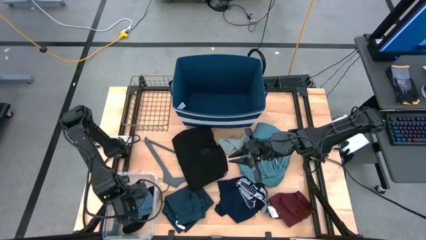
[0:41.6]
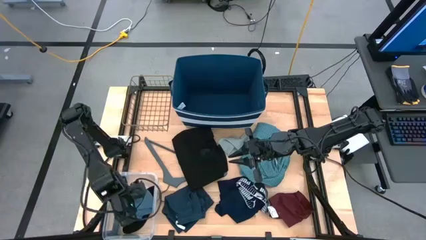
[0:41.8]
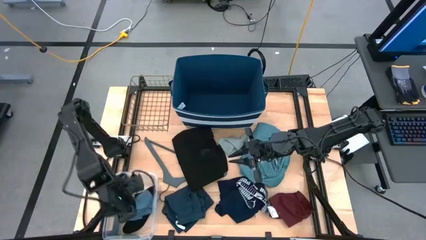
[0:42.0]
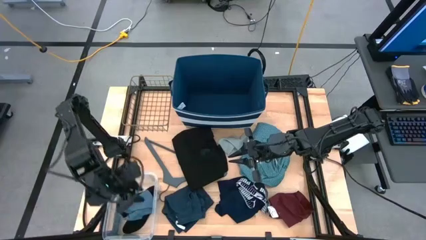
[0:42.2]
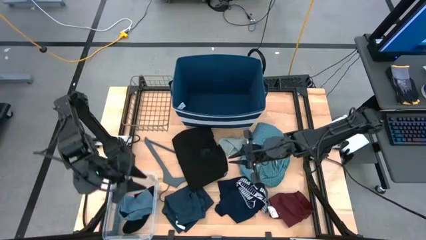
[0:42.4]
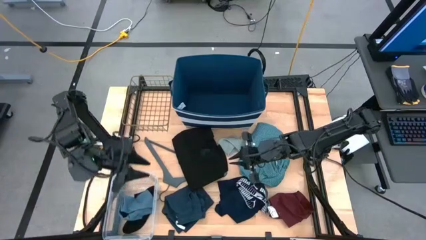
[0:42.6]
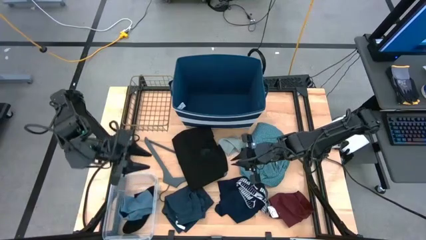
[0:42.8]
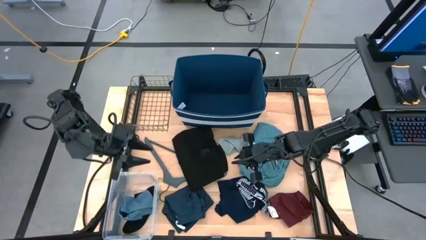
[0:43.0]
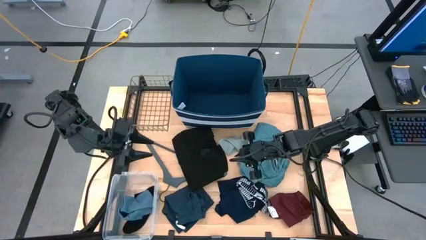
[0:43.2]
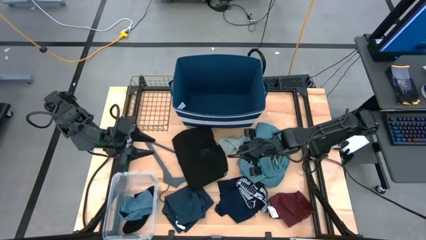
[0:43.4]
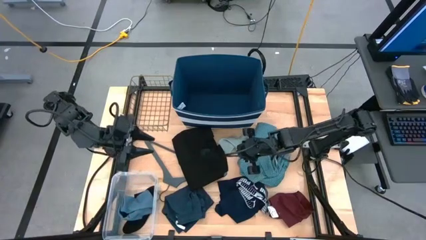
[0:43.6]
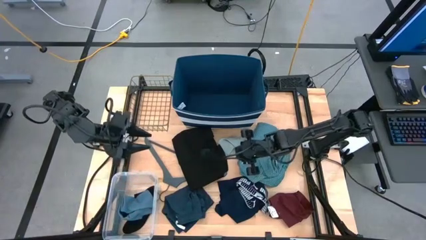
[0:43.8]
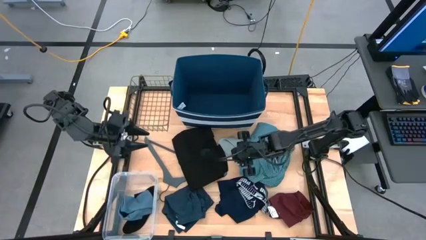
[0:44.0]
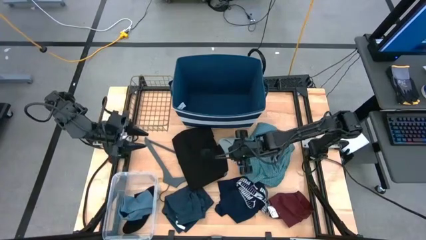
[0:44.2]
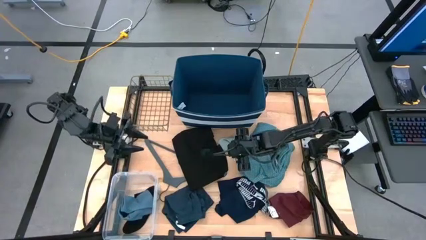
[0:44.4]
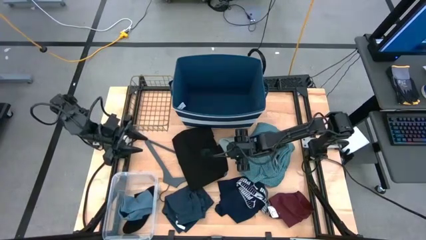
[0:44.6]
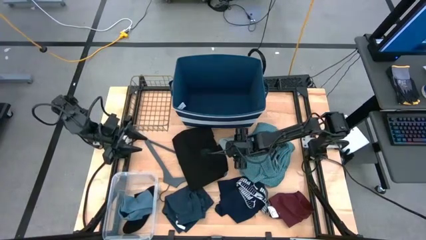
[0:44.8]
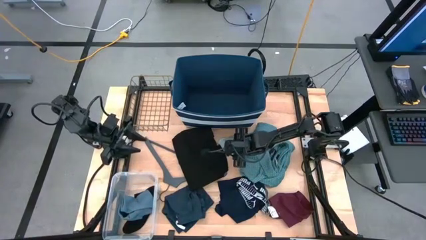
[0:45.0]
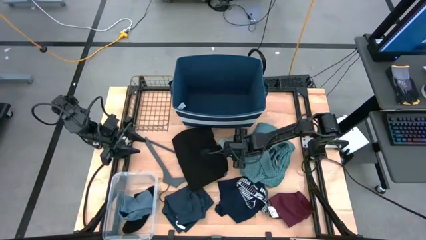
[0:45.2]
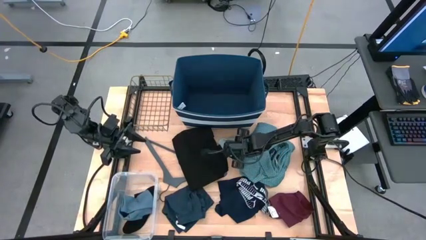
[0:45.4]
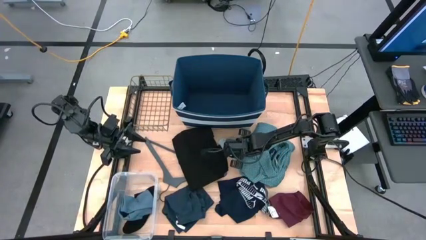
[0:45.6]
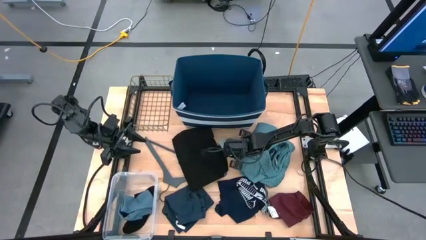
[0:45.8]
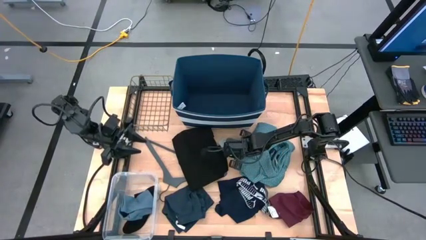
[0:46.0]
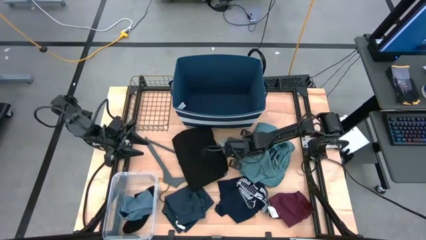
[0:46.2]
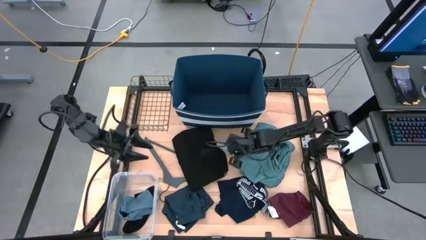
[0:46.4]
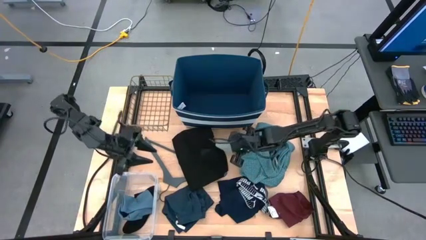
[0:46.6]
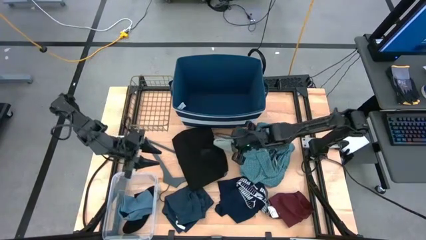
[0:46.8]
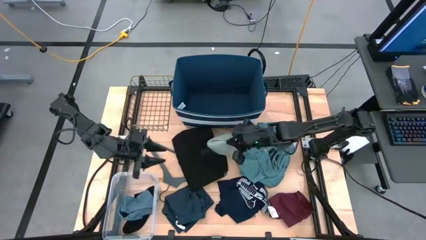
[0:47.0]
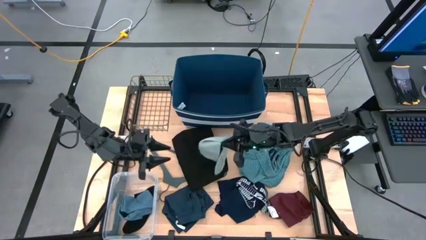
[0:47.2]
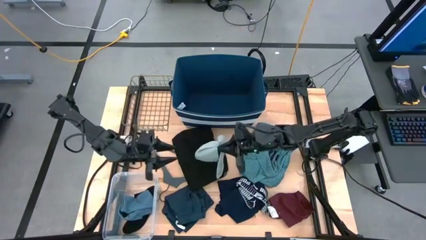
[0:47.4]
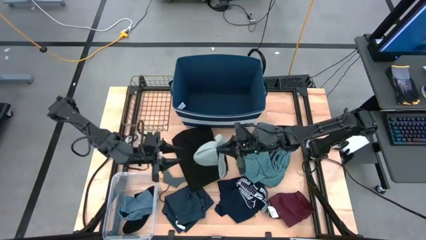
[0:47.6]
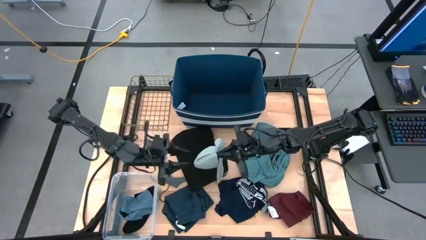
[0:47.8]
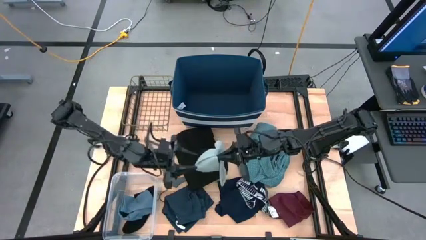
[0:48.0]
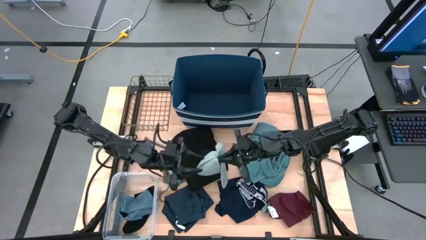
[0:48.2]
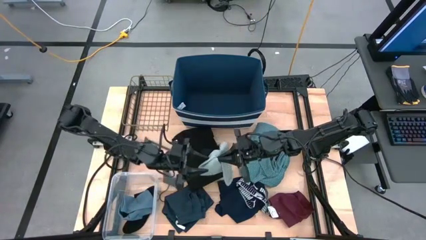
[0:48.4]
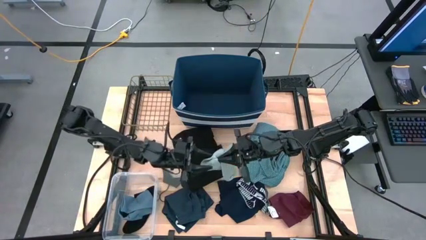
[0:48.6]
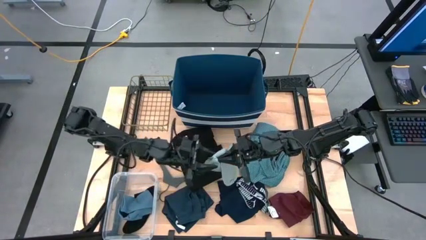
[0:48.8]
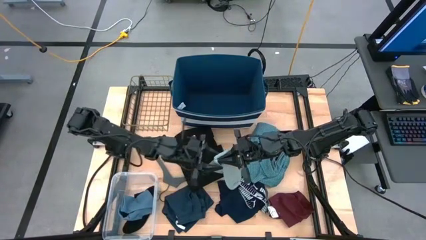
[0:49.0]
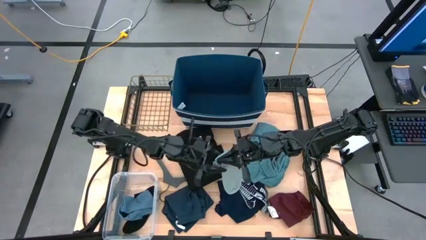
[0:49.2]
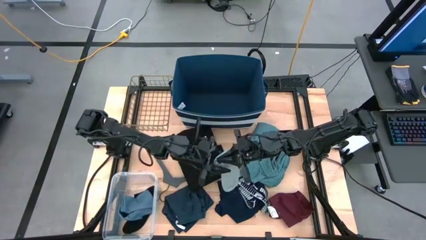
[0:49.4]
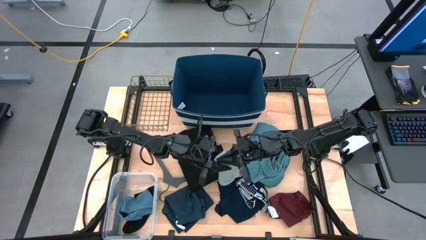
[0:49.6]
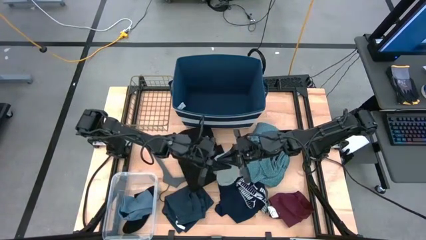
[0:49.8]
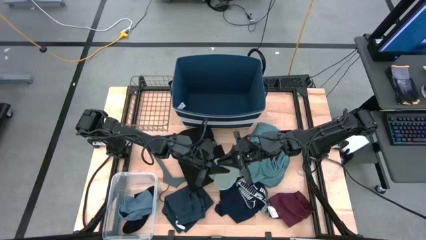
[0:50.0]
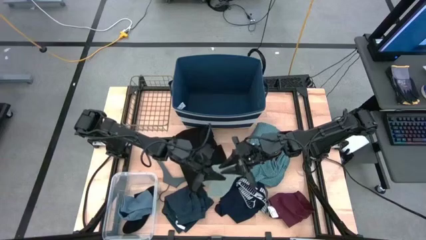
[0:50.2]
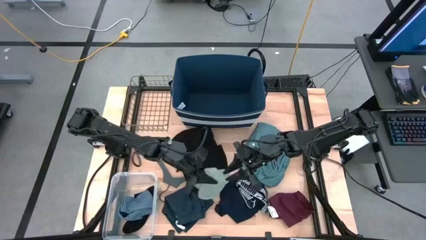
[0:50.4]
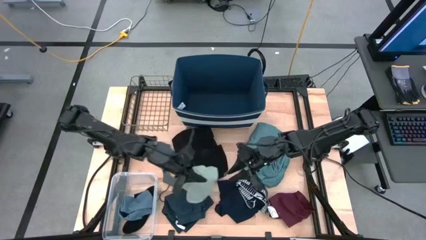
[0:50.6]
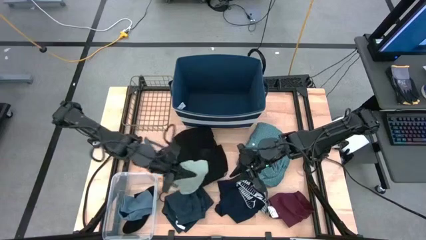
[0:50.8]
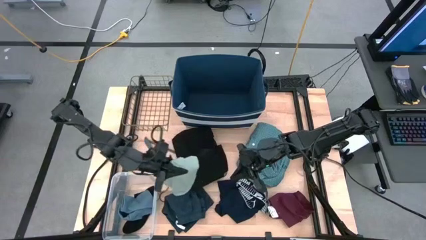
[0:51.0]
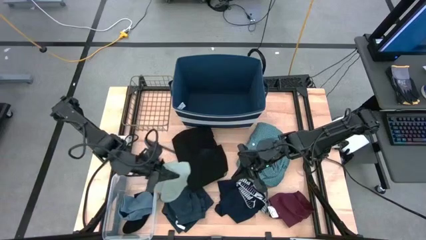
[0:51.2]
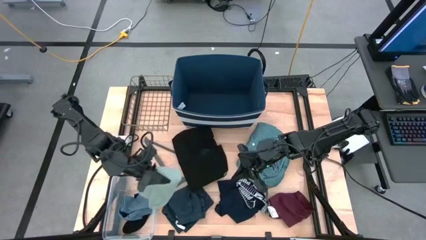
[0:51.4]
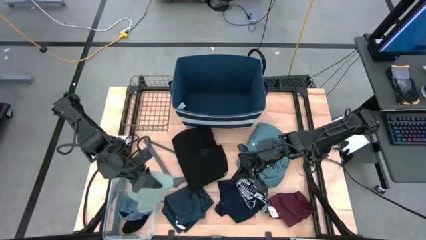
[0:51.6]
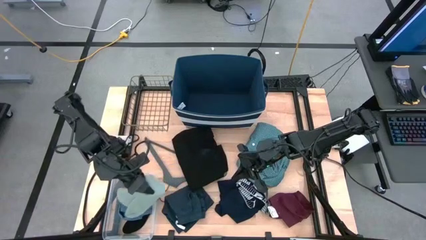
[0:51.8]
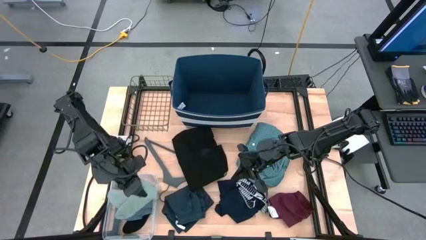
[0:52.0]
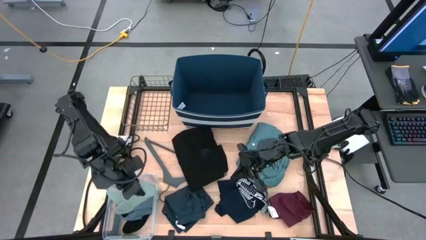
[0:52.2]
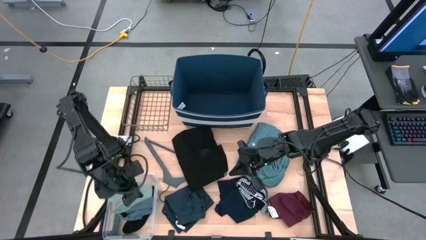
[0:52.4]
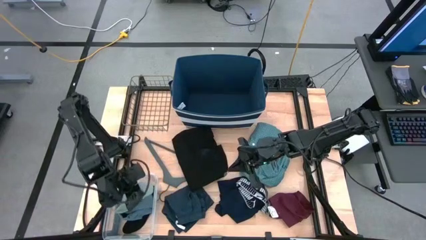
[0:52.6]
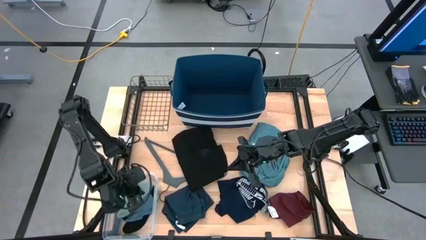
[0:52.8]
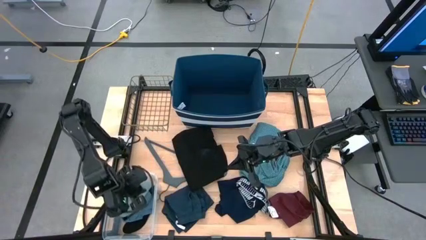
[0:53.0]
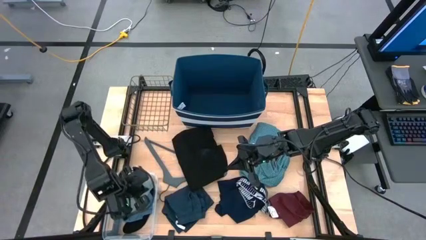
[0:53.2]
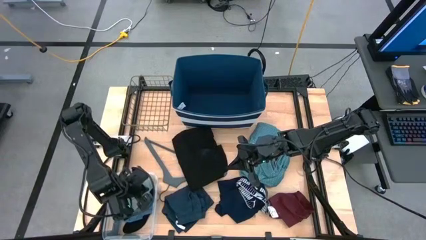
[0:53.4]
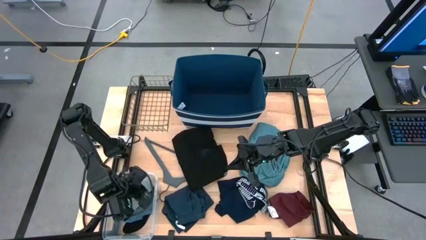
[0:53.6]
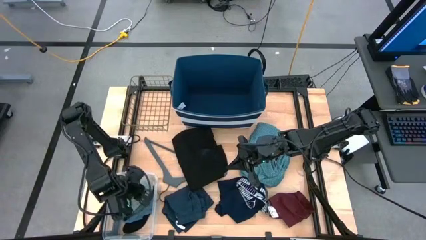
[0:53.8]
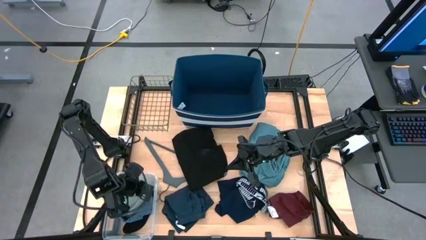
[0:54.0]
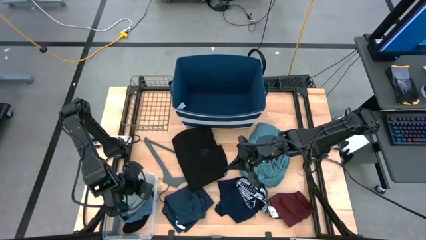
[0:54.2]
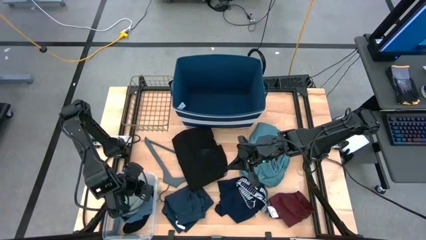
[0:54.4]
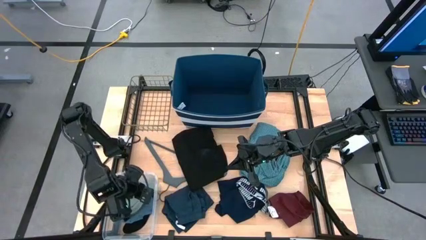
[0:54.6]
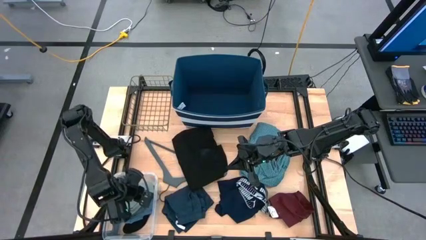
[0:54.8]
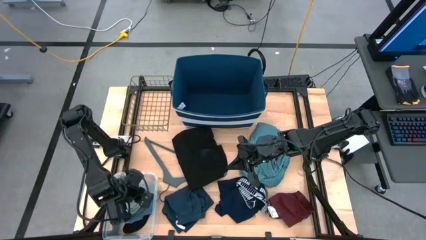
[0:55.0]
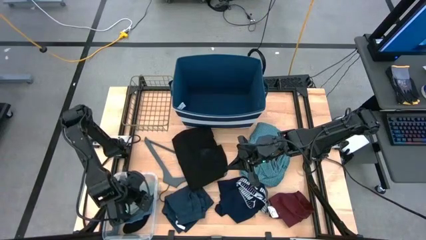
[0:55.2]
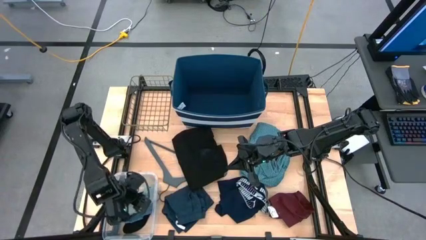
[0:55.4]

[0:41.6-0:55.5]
Task: Pick & Place Cloths
Put the gray sock into the transparent container
